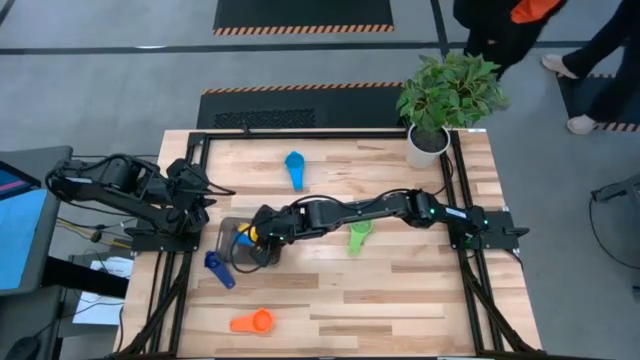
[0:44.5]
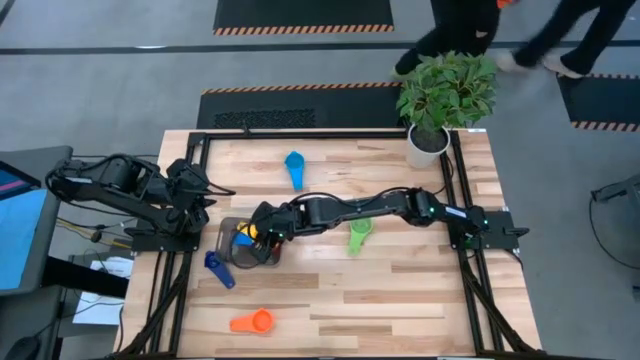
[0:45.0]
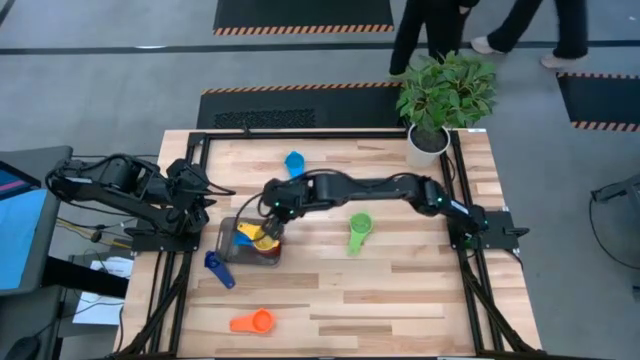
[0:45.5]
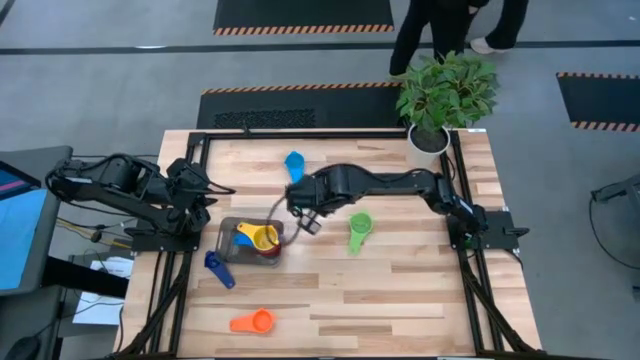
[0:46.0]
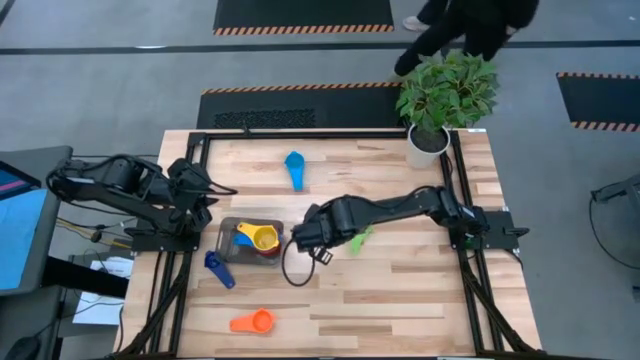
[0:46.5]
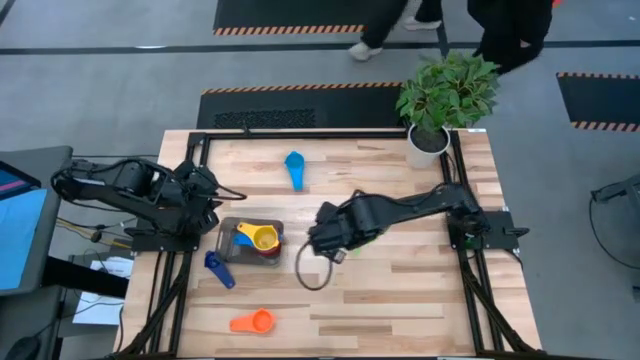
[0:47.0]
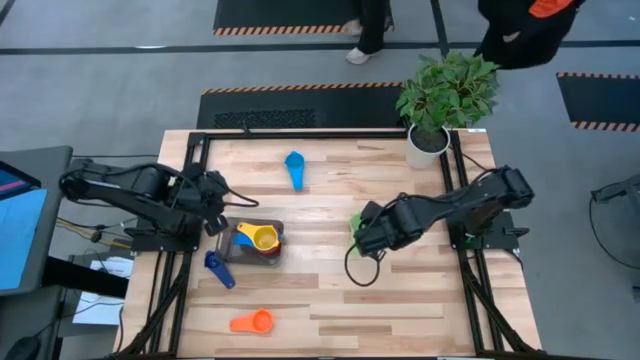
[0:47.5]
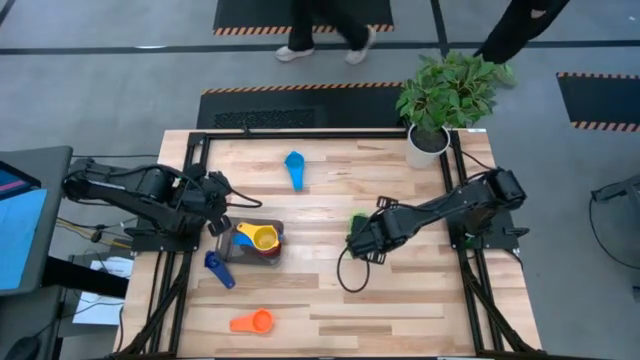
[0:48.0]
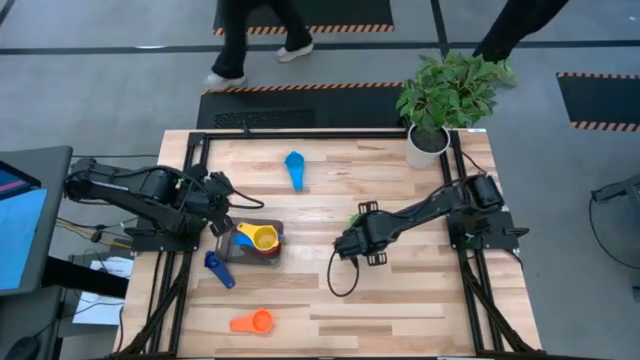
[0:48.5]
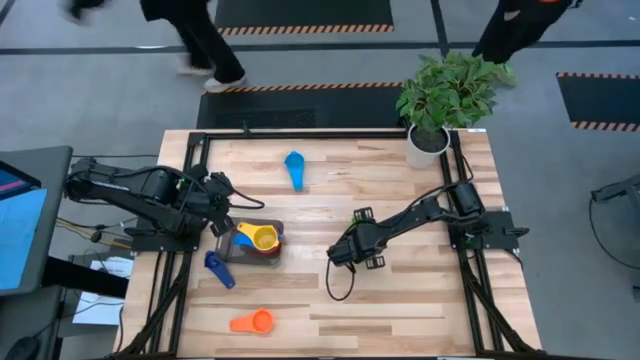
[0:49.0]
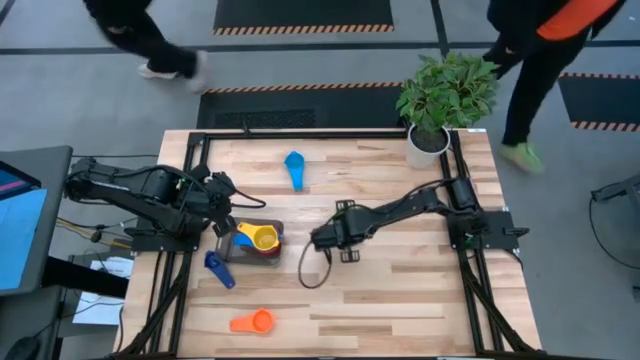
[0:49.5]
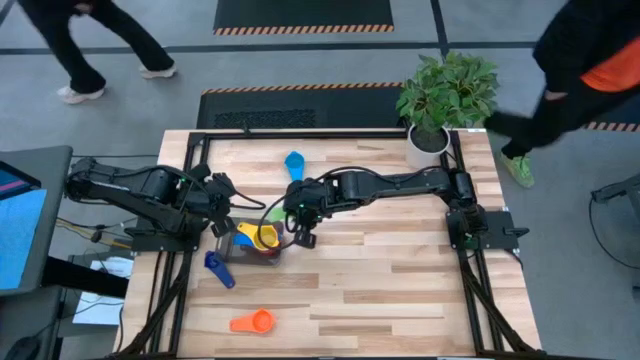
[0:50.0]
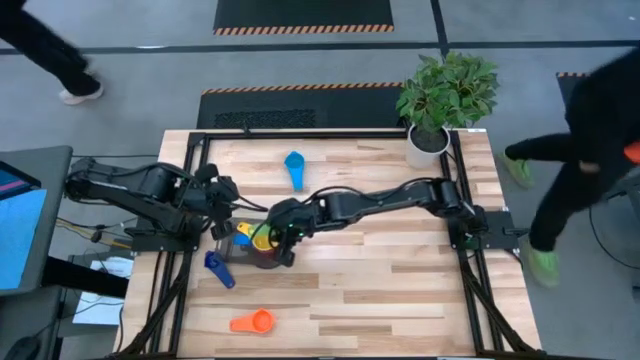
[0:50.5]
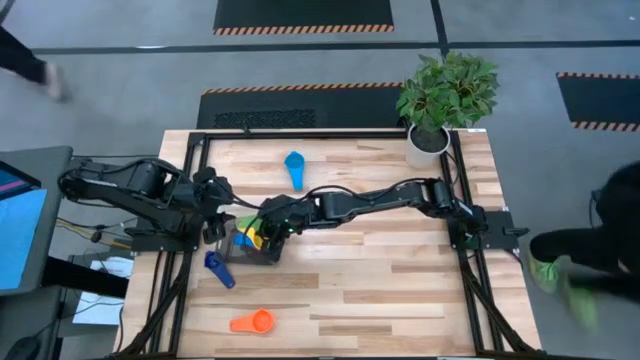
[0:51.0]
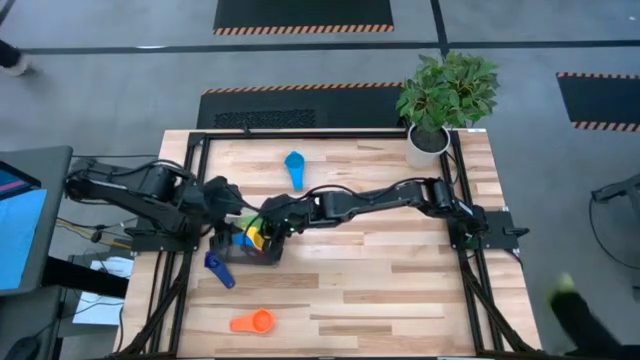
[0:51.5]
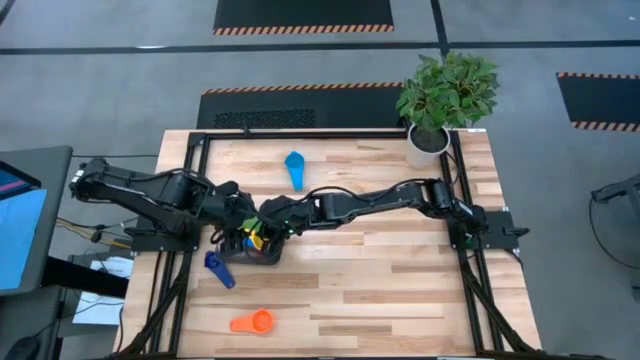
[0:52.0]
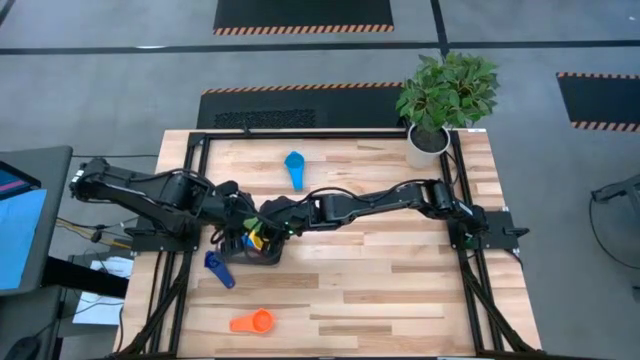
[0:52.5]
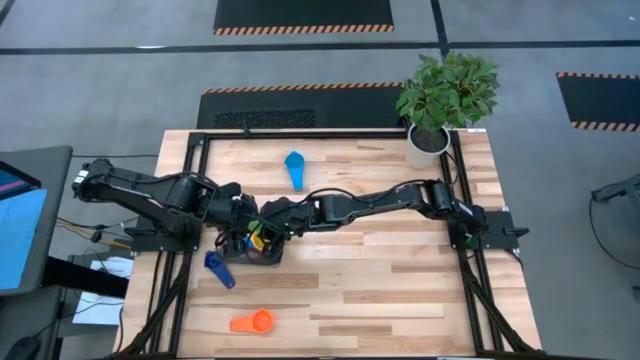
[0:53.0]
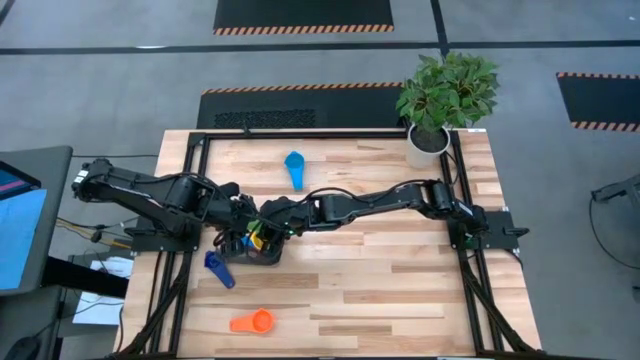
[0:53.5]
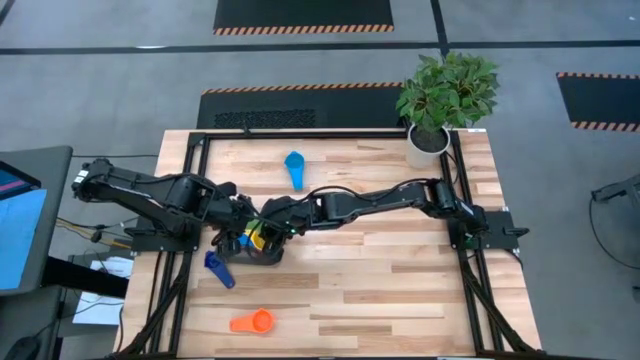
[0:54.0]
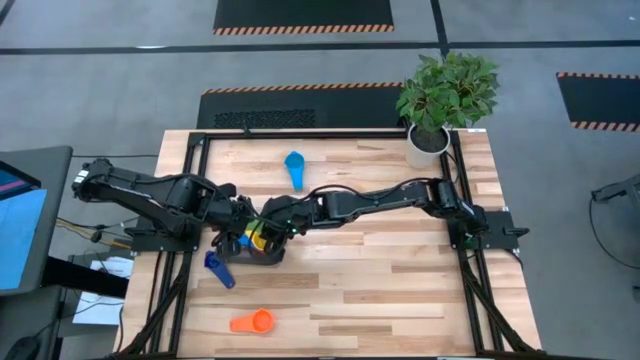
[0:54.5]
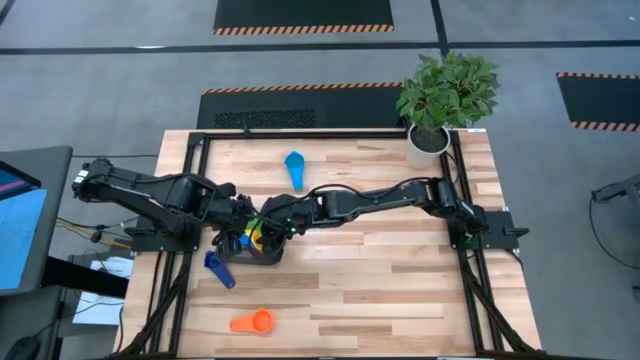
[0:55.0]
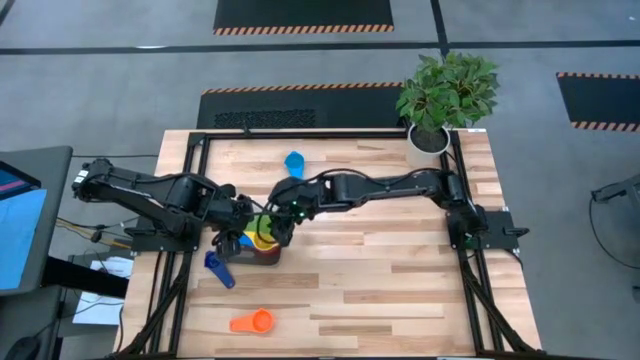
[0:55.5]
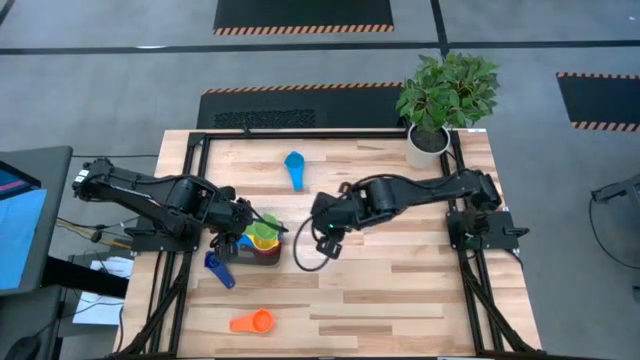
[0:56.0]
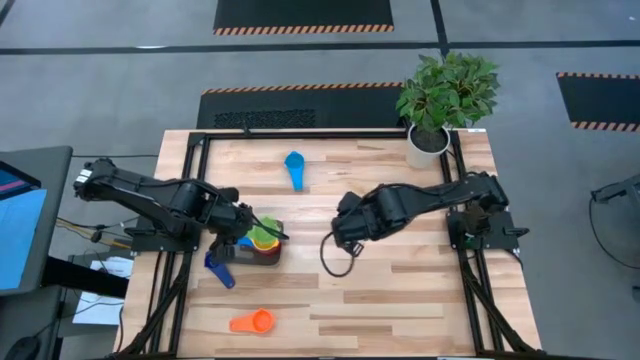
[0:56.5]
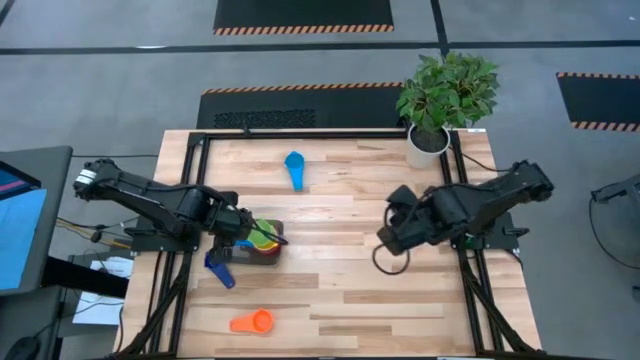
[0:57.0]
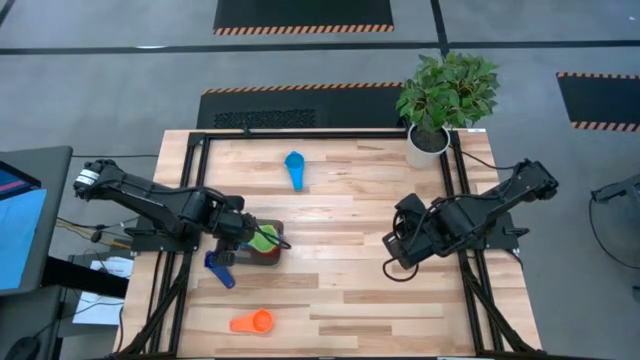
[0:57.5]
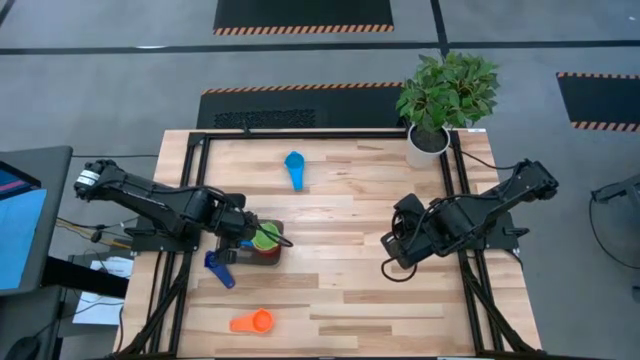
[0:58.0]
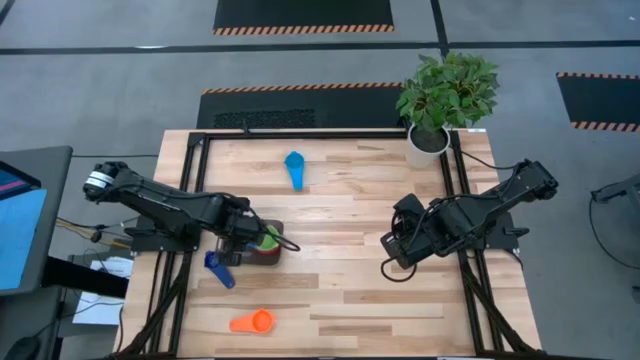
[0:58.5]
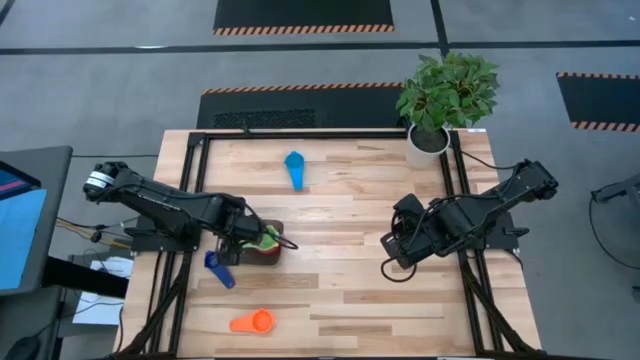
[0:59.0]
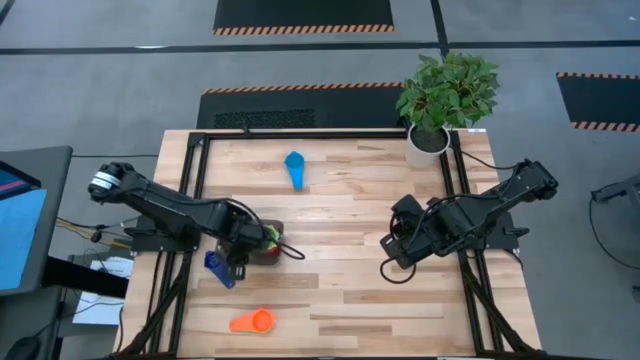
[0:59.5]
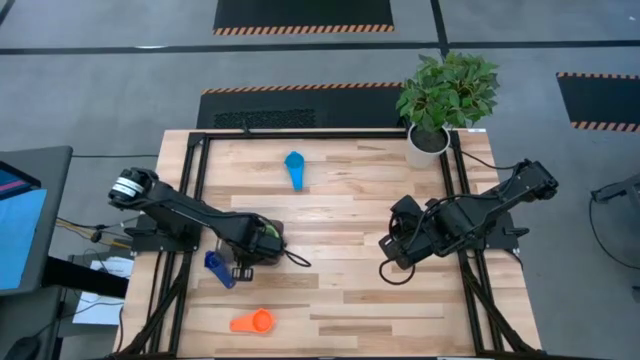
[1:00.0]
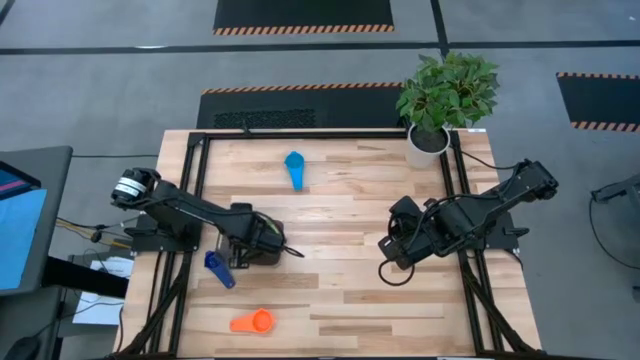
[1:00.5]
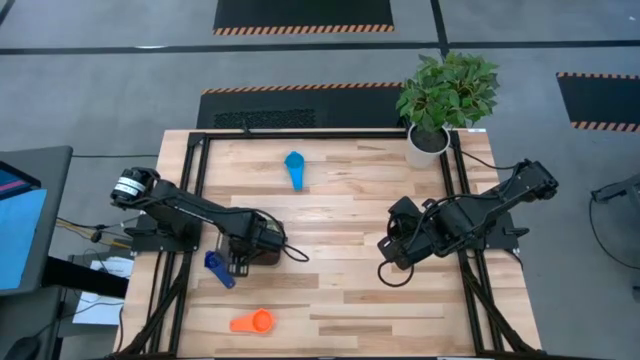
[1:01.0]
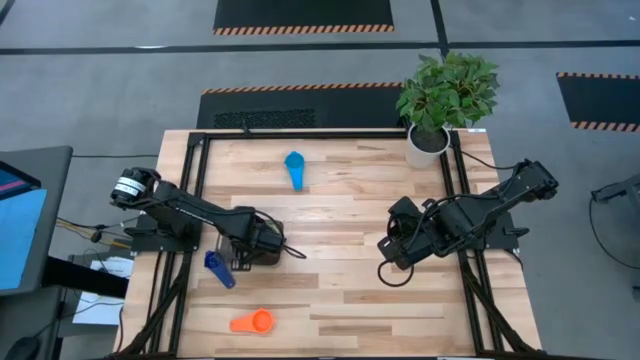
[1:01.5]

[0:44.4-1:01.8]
Task: Nest measuring cups in basket
Stack the green measuring cup on top of the yellow measuring cup in the black bin

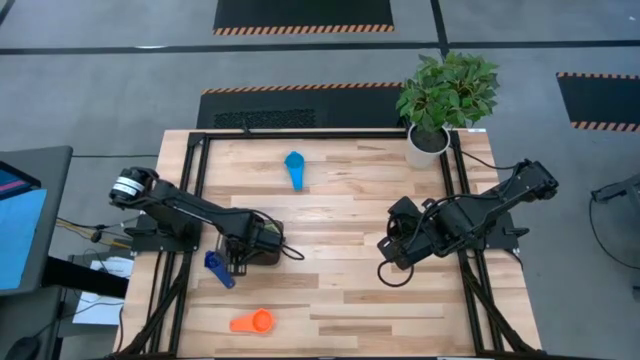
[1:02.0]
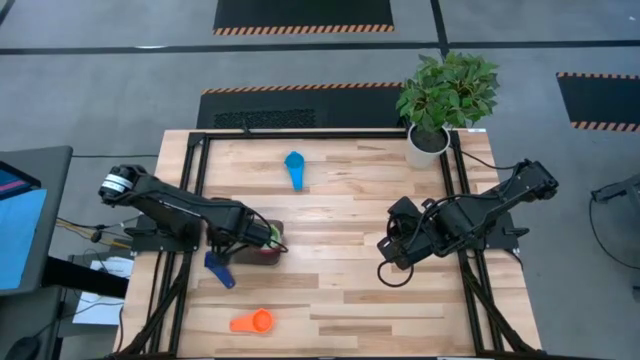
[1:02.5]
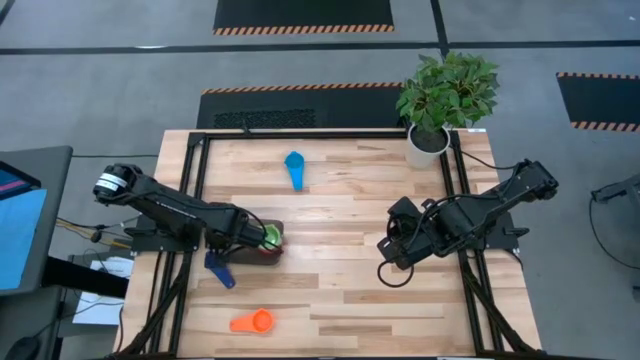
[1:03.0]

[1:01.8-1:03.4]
Adjust the black bin

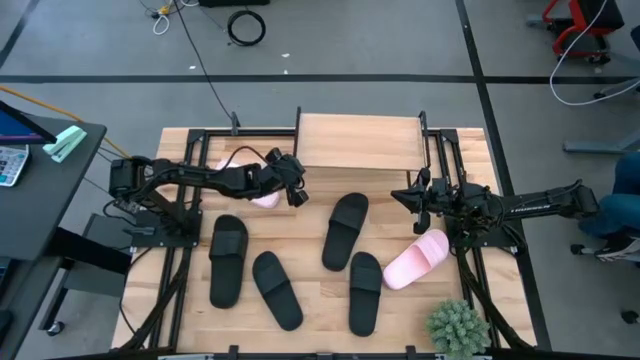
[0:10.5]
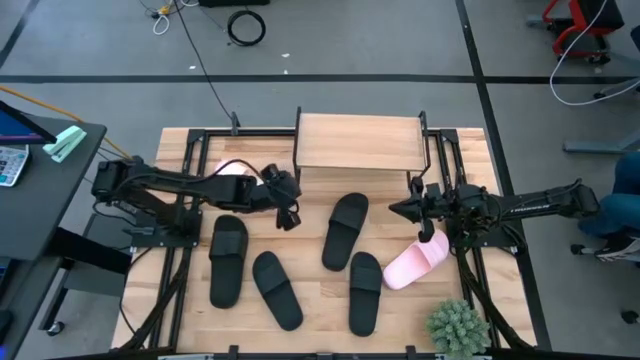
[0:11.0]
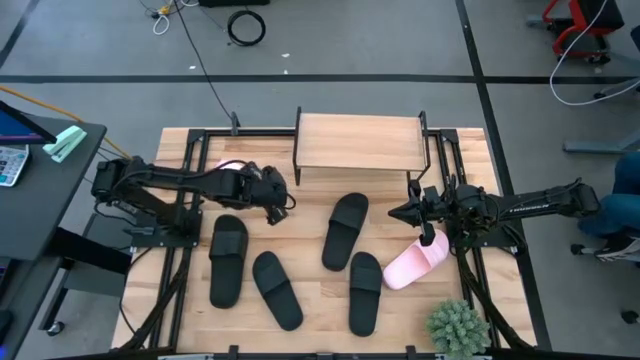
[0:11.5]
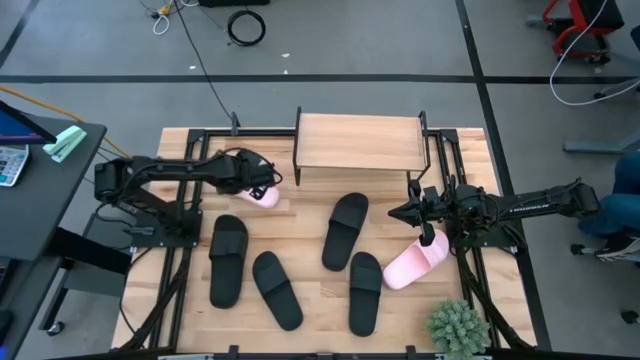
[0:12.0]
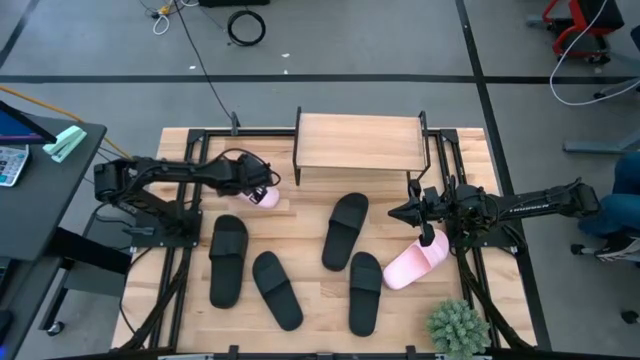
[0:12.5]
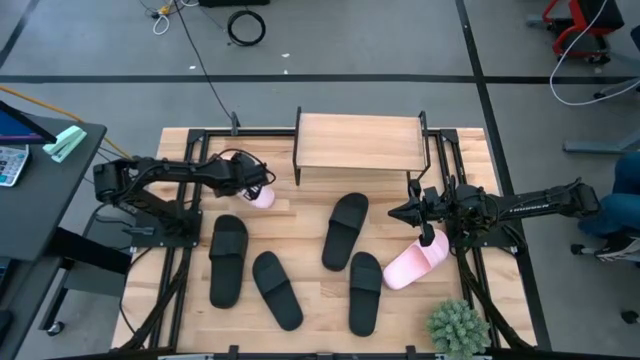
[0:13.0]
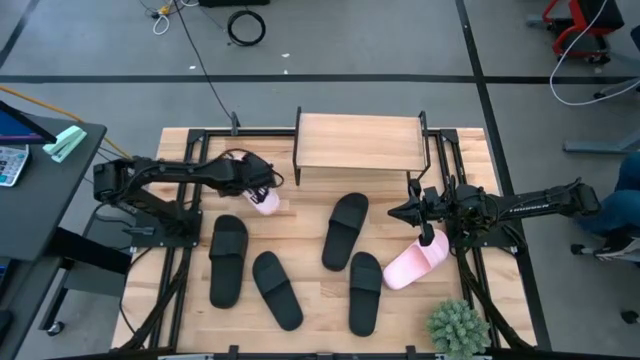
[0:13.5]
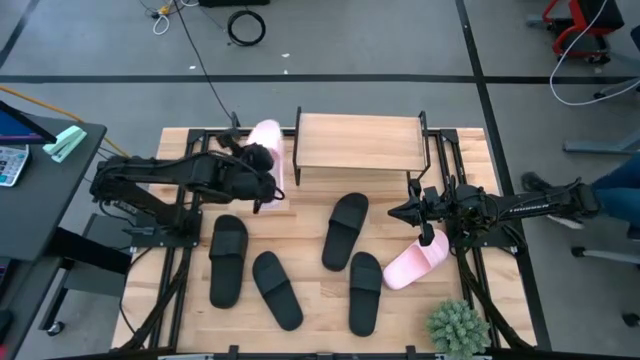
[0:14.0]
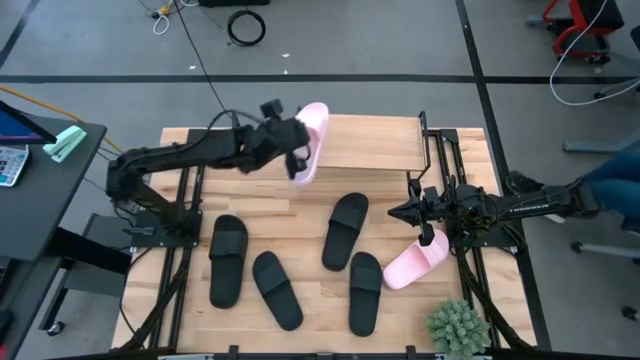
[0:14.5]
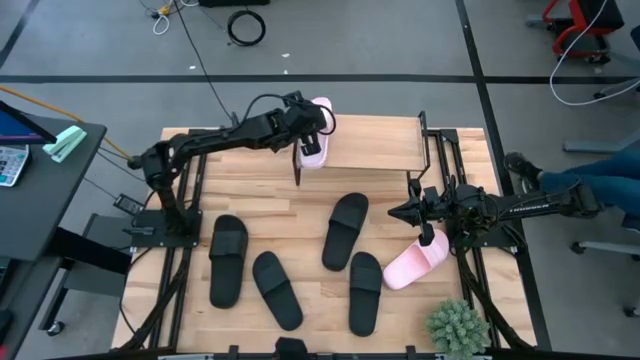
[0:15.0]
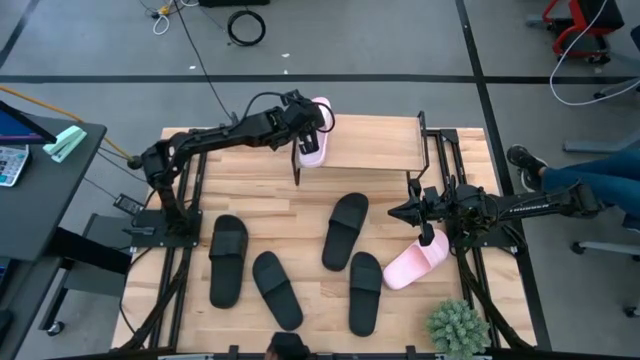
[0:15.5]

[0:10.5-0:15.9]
Task: Pick and place slides into the shelf
Put the left pink slide on the shelf
